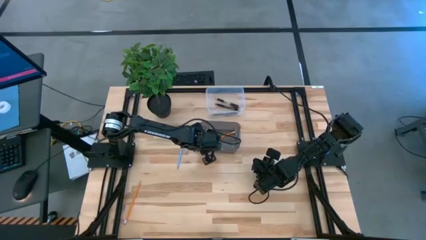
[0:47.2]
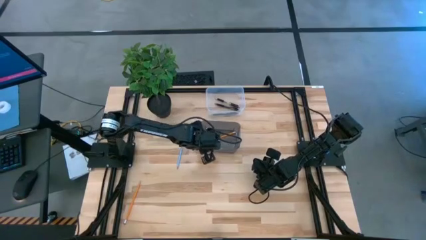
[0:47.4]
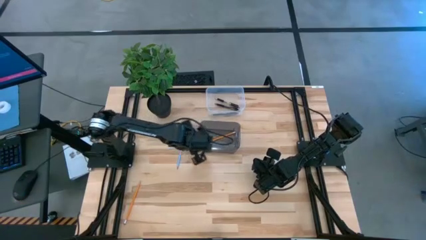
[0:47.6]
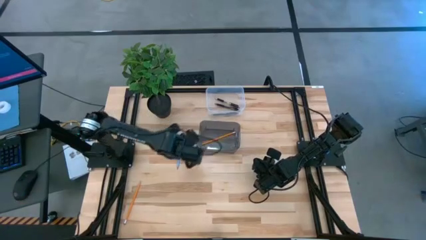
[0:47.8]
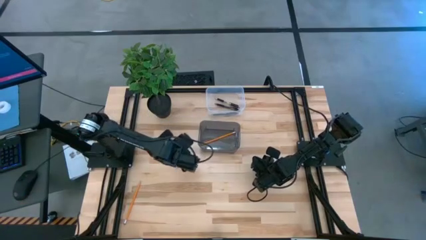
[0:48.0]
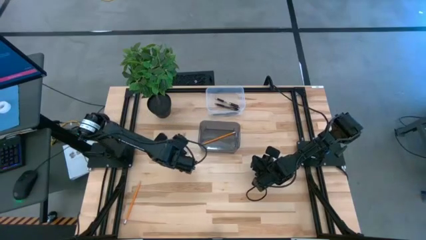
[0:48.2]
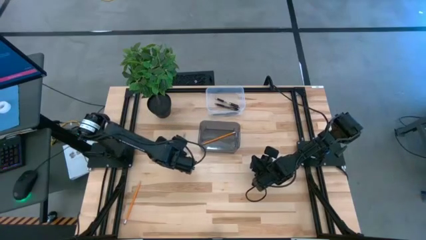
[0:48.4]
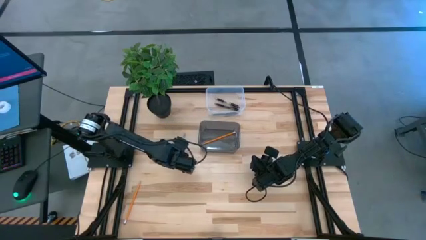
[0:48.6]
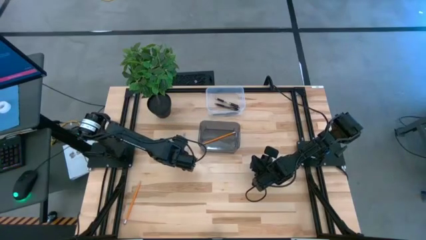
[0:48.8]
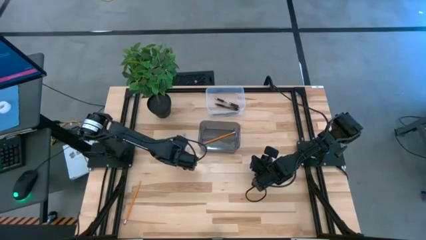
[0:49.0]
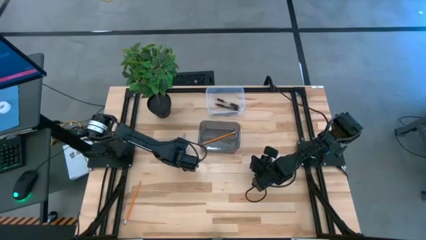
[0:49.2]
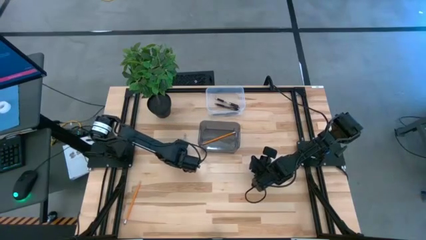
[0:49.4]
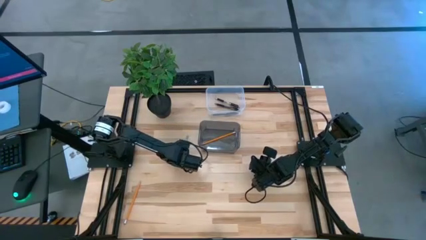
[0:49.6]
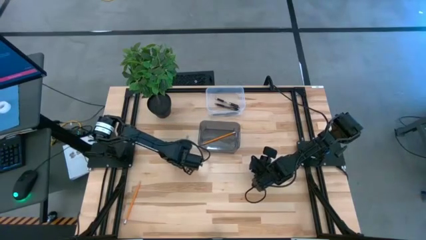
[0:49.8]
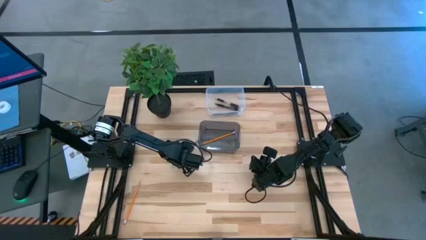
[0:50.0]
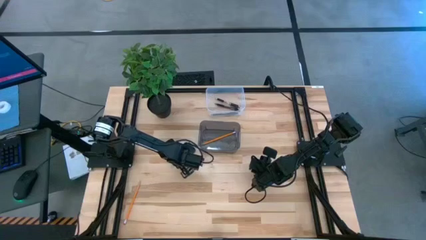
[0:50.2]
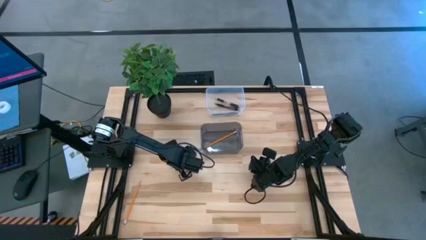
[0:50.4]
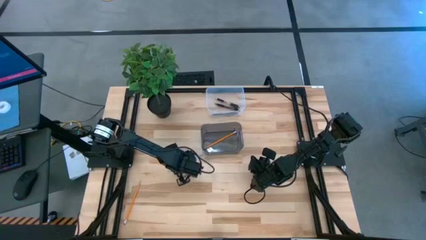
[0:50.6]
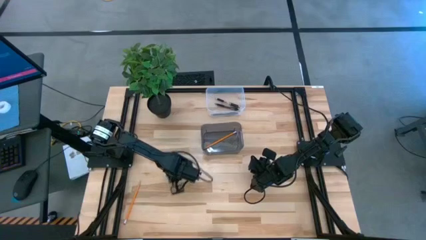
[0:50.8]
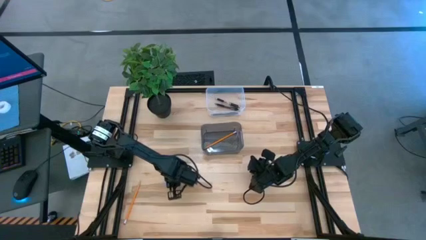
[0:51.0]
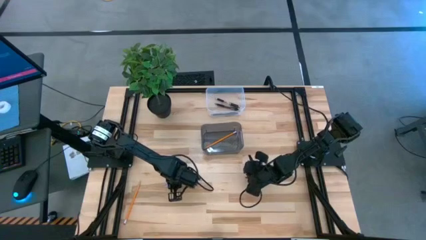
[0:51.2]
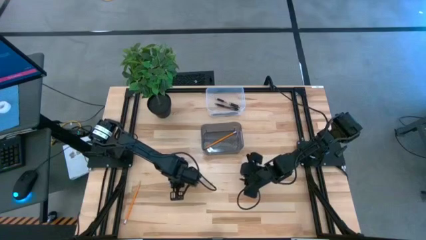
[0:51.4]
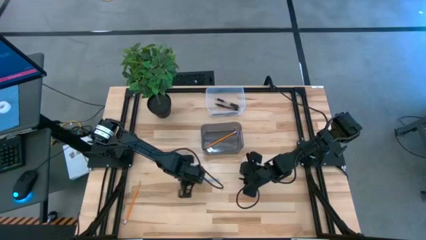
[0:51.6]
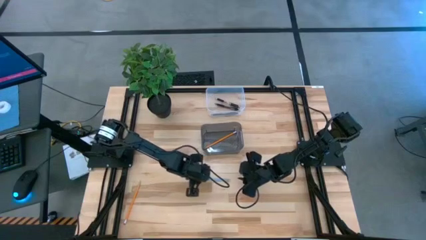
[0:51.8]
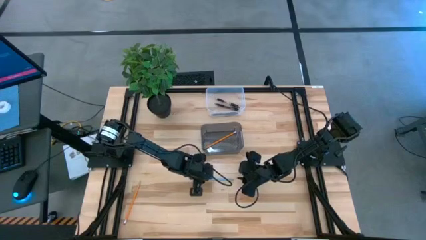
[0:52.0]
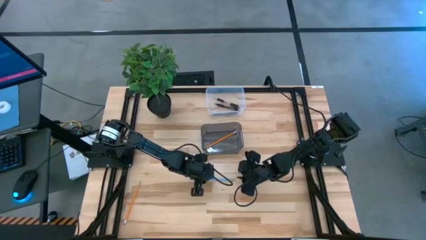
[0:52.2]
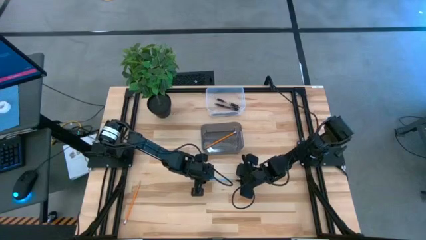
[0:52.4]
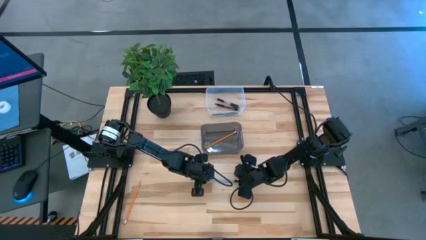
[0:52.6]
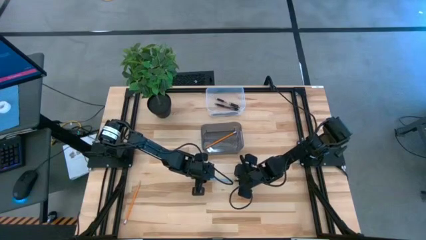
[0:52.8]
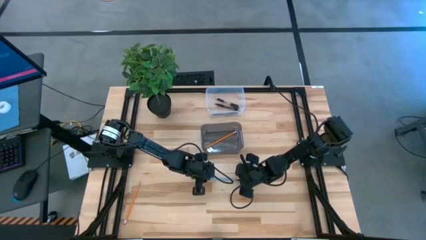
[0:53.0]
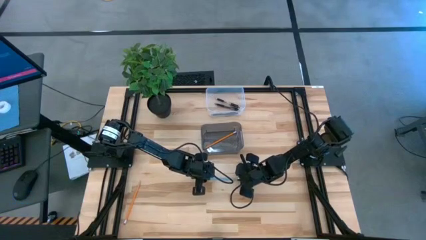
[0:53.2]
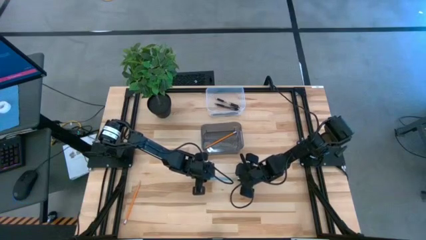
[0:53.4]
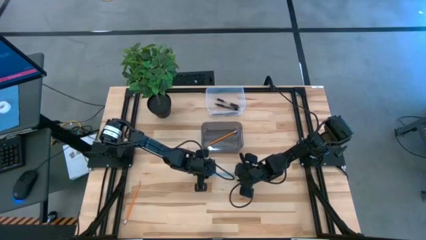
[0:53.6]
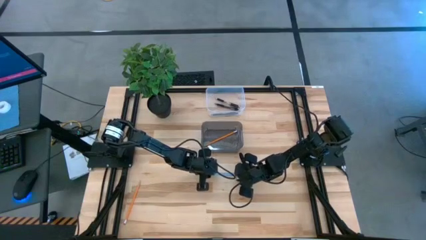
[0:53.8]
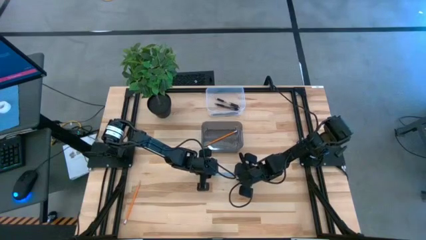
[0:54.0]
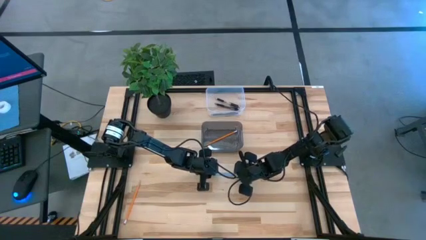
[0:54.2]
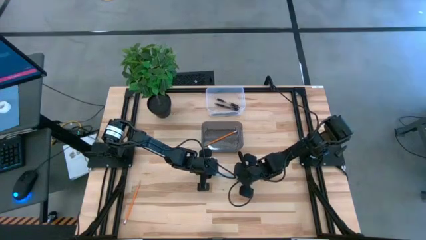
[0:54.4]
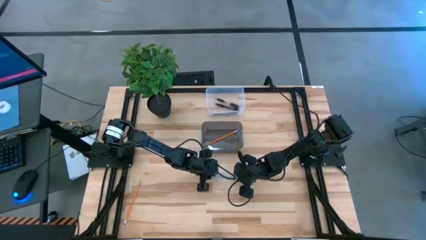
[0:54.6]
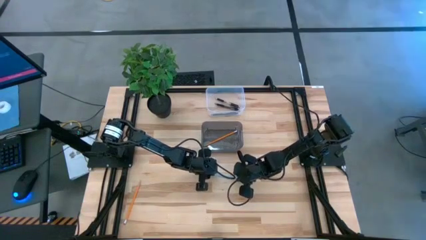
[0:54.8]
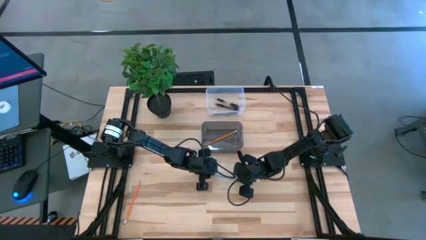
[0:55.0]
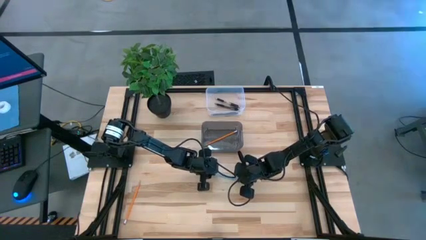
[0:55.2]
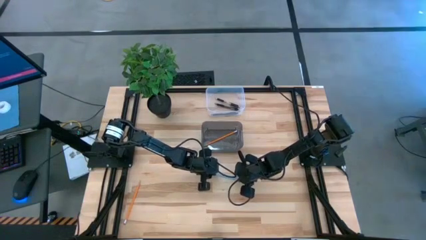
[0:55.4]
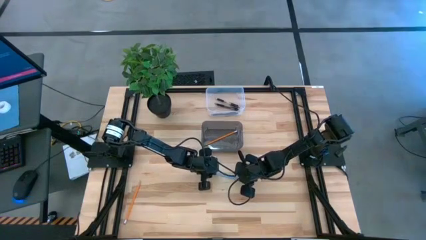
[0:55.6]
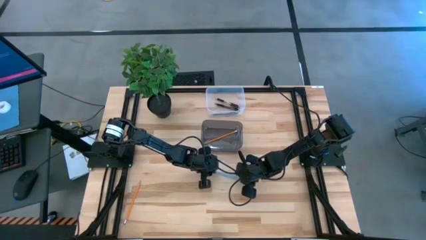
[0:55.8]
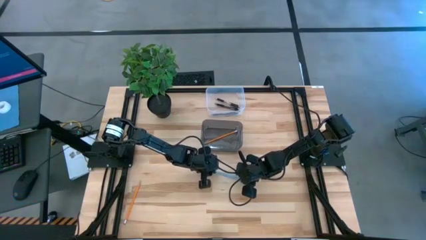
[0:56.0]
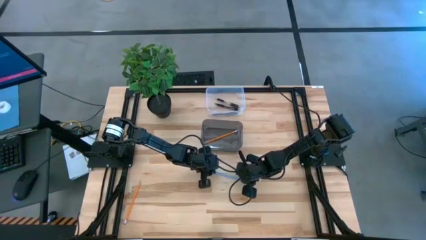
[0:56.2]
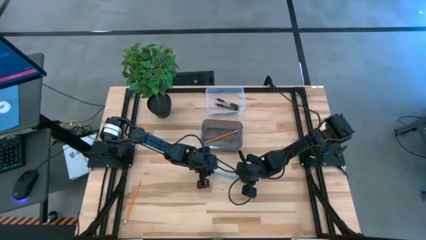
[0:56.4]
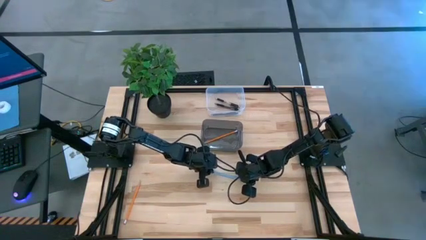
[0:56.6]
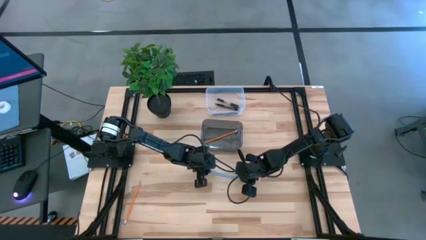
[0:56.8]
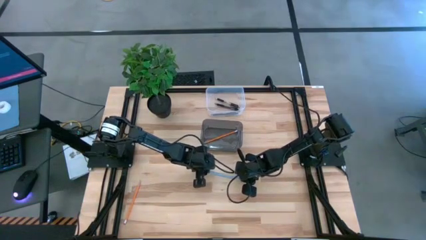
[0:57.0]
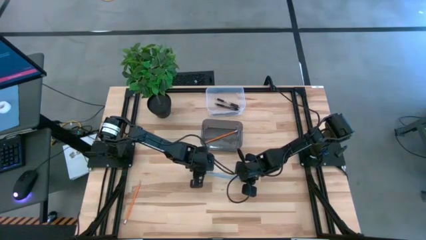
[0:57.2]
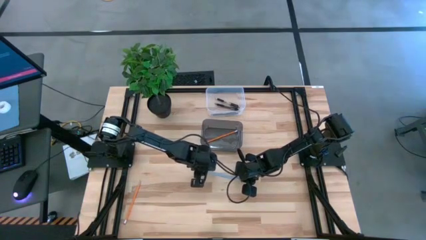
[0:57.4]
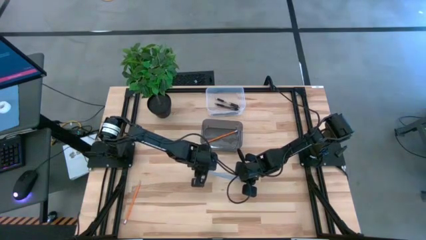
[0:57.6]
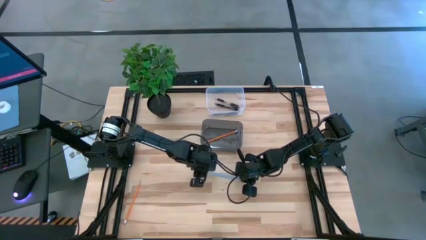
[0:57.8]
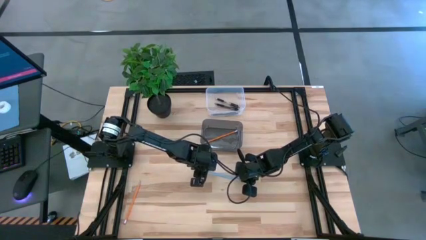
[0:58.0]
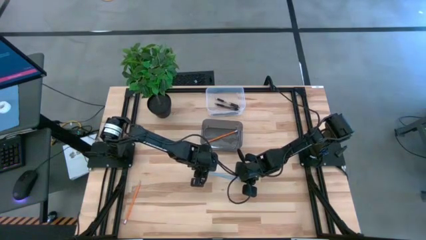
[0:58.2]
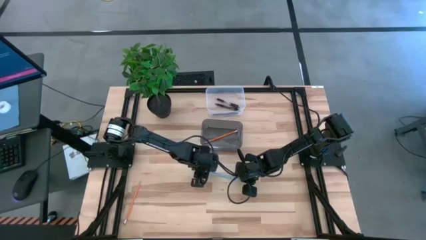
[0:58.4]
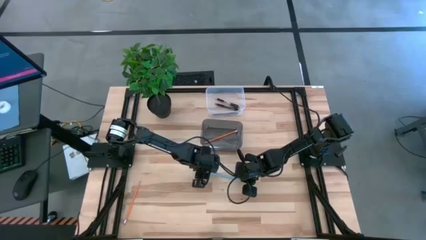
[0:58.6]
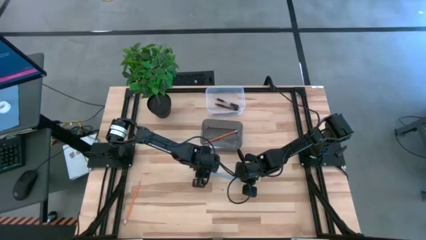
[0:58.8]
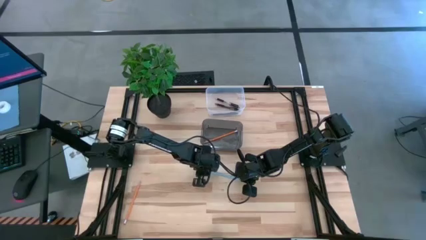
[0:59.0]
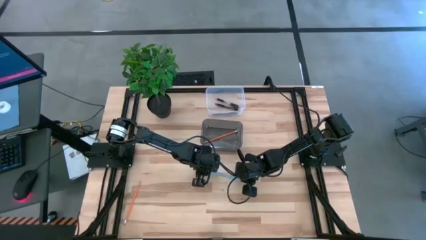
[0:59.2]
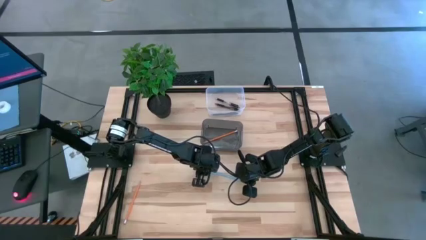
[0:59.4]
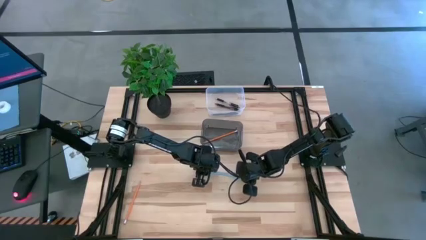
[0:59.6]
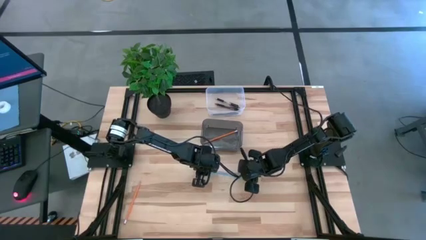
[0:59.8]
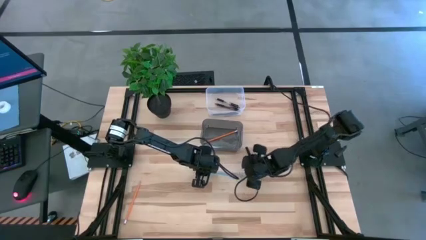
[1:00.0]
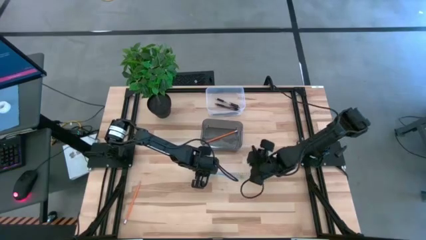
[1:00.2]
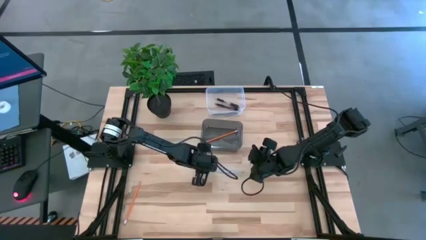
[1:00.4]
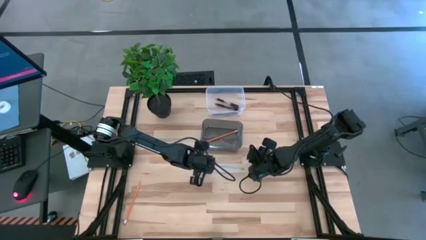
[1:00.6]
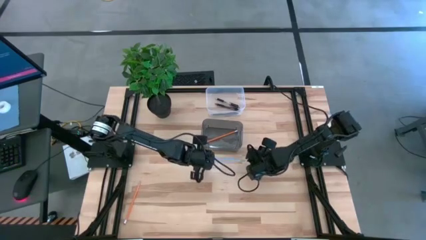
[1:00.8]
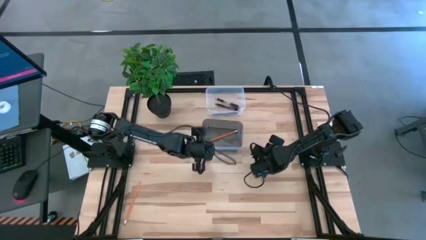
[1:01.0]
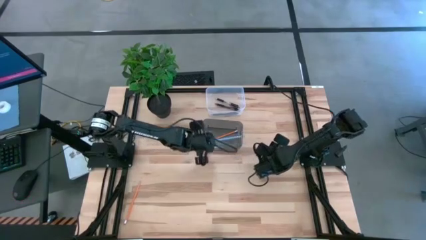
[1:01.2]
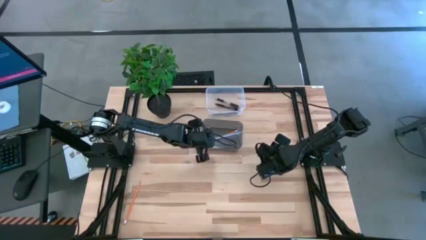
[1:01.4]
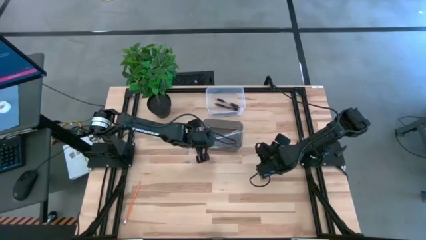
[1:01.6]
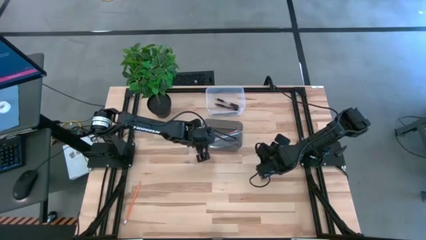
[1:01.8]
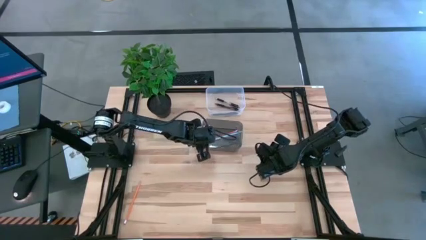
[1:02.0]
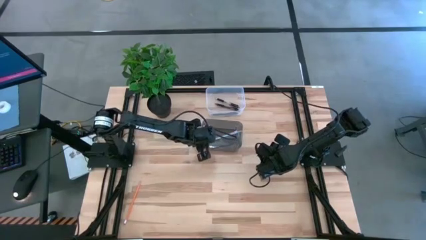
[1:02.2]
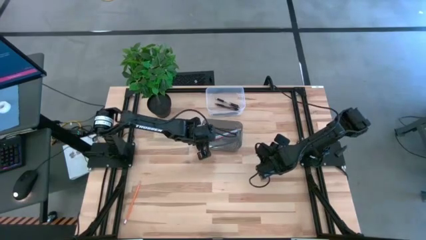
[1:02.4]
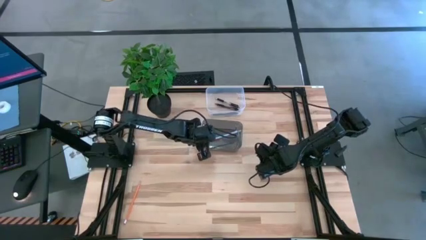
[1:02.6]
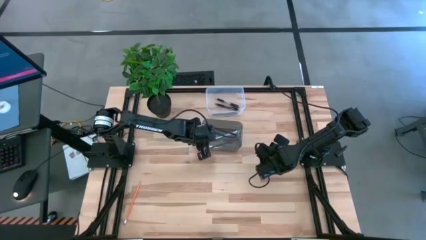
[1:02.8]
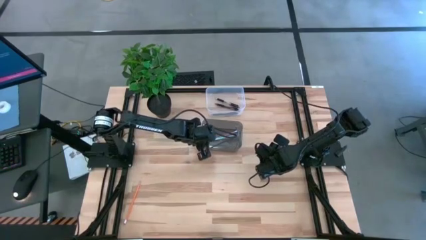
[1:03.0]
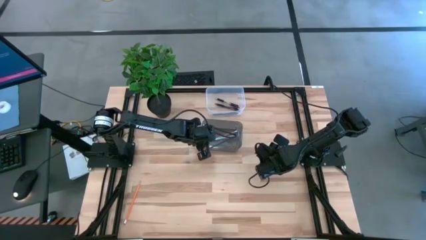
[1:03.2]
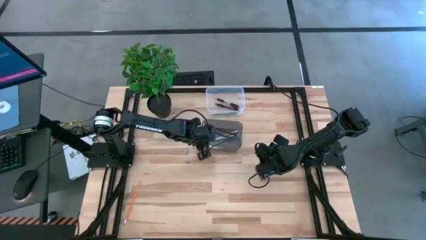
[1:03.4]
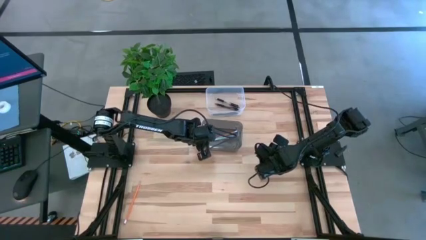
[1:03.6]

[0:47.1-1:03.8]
Task: Sort pens & pencils
Put the blue pencil into the black bin
